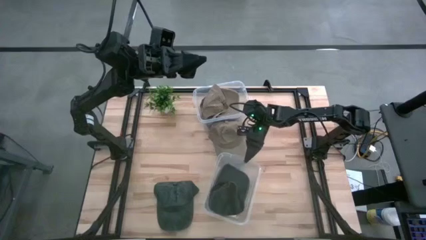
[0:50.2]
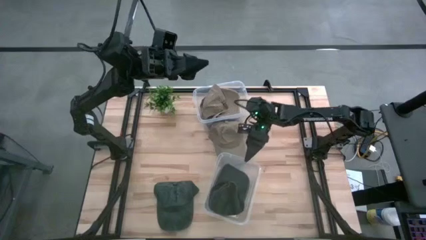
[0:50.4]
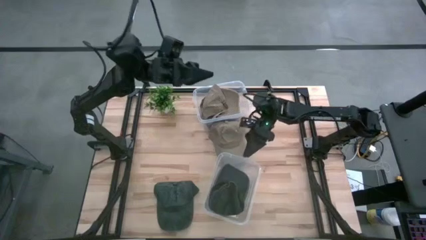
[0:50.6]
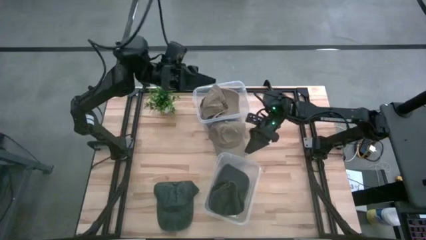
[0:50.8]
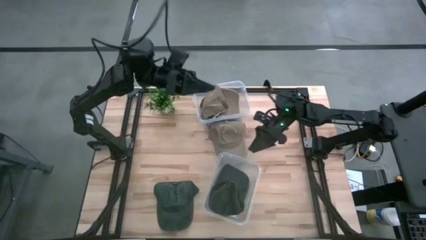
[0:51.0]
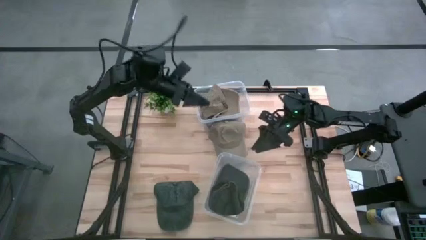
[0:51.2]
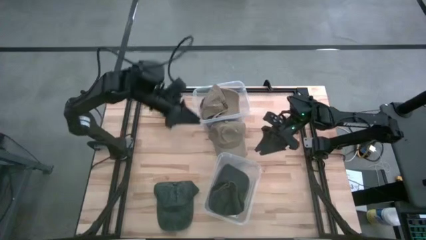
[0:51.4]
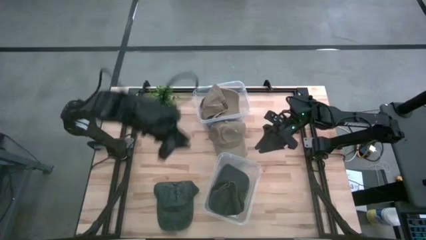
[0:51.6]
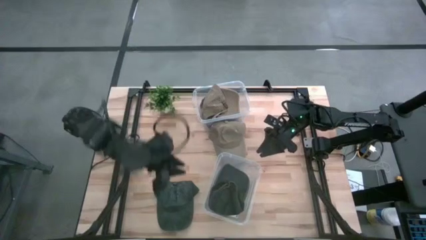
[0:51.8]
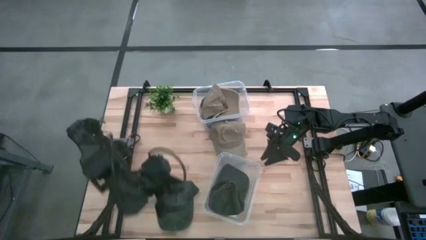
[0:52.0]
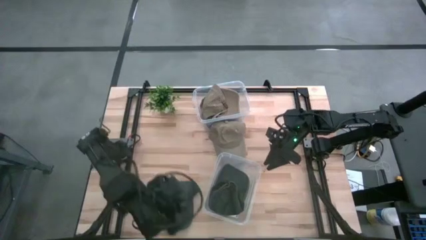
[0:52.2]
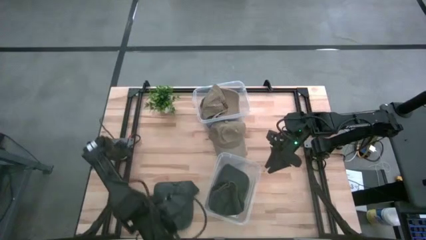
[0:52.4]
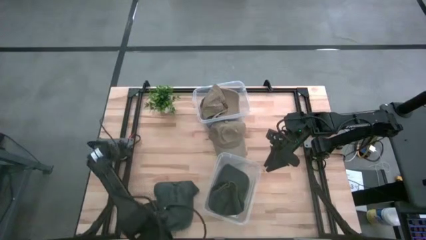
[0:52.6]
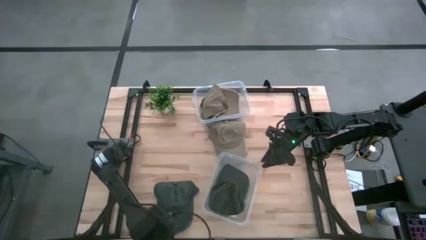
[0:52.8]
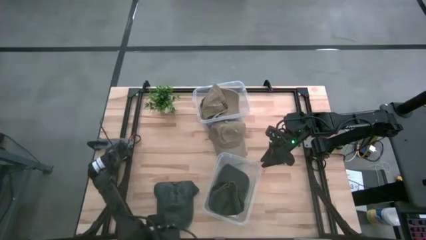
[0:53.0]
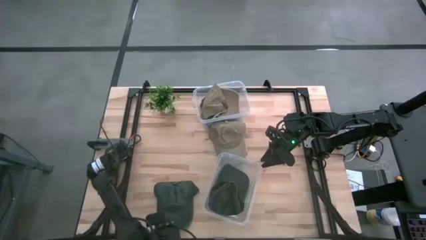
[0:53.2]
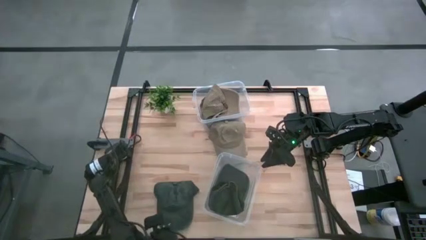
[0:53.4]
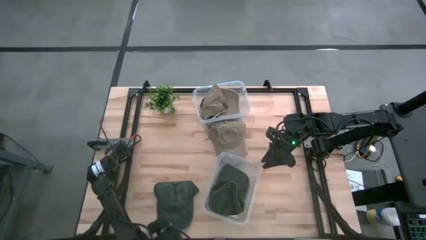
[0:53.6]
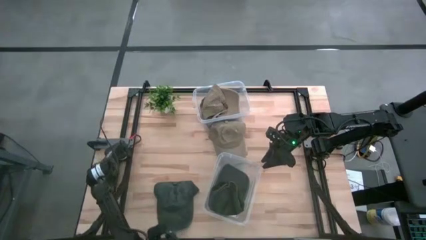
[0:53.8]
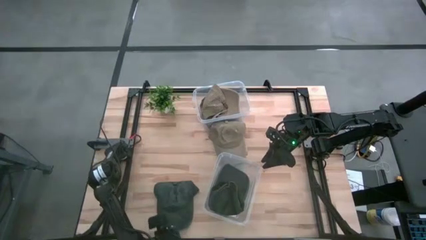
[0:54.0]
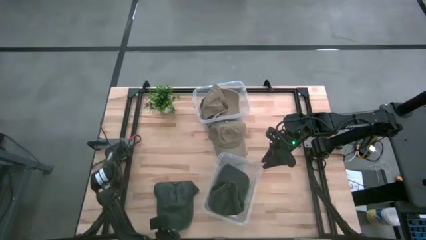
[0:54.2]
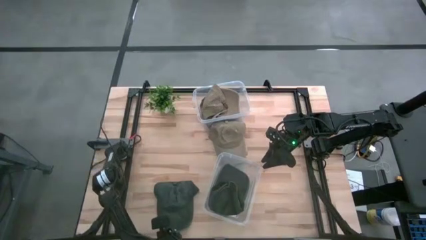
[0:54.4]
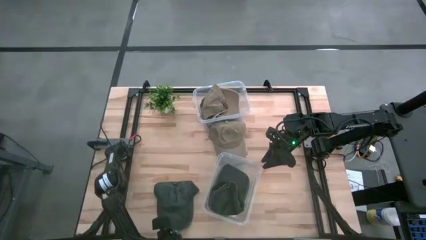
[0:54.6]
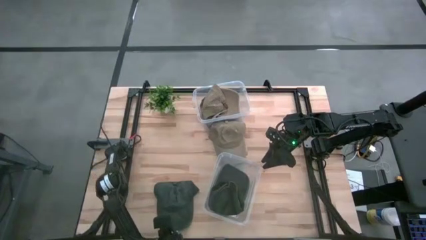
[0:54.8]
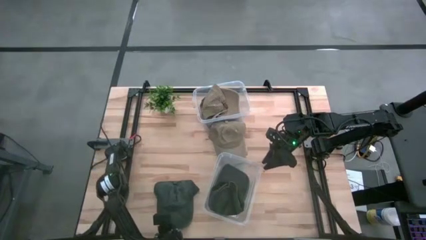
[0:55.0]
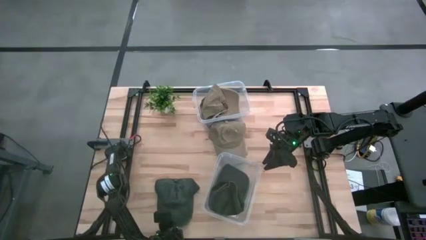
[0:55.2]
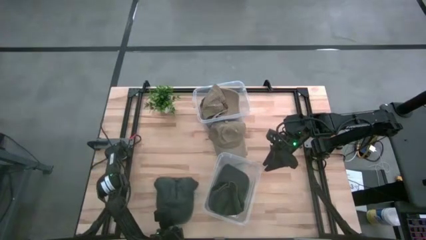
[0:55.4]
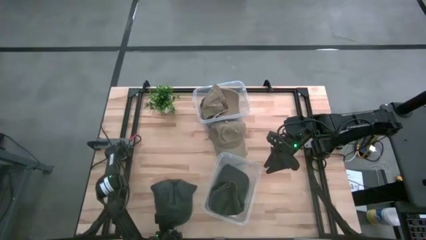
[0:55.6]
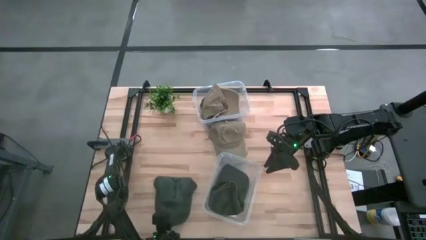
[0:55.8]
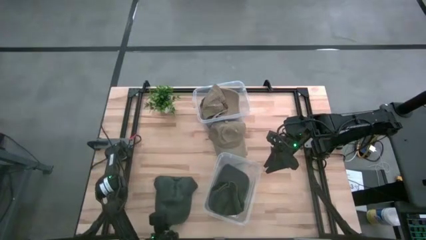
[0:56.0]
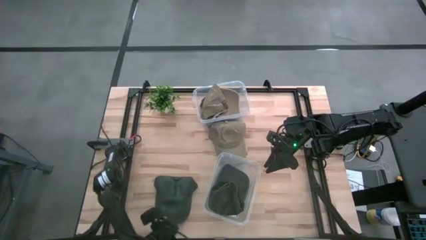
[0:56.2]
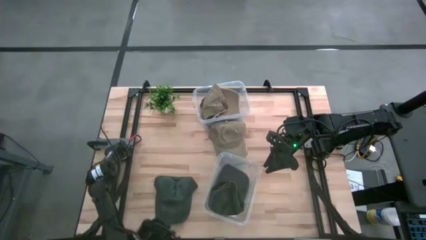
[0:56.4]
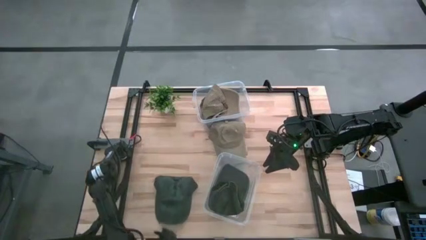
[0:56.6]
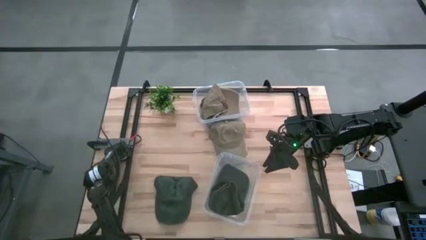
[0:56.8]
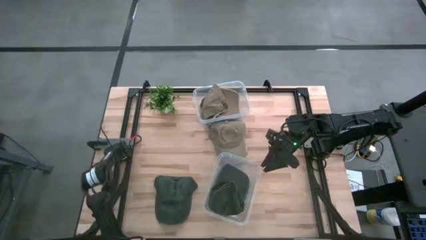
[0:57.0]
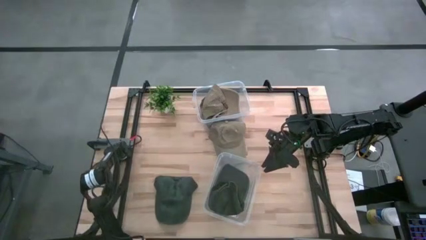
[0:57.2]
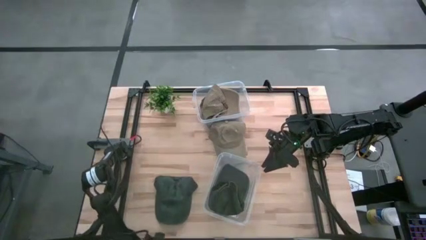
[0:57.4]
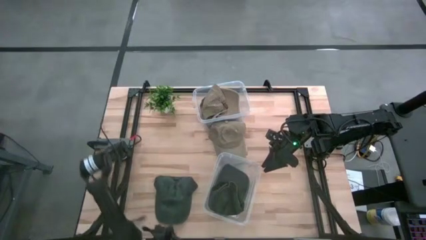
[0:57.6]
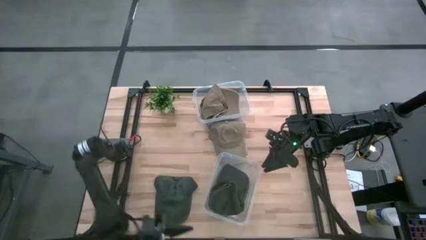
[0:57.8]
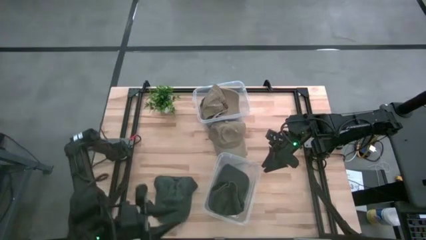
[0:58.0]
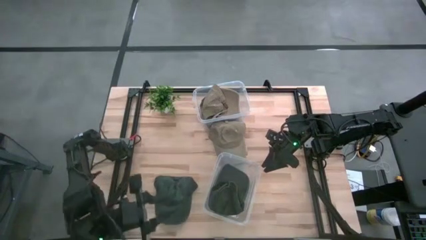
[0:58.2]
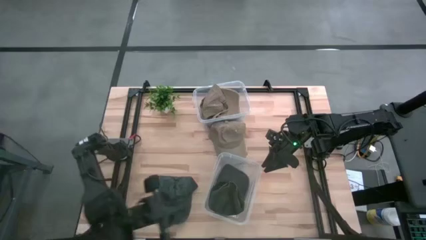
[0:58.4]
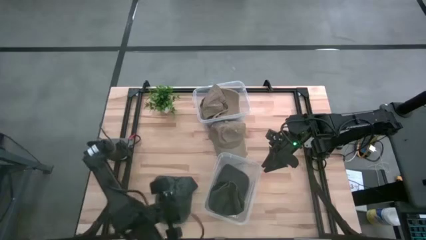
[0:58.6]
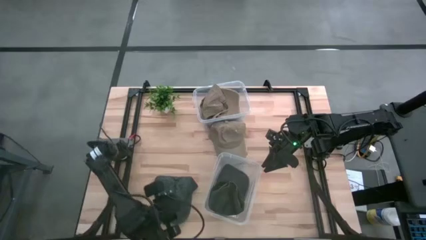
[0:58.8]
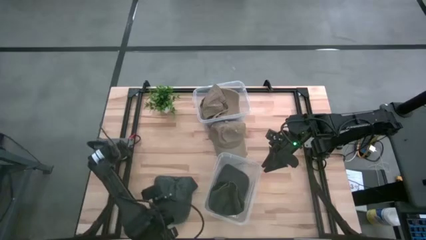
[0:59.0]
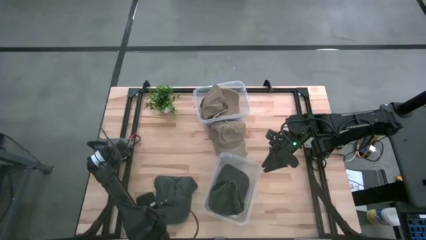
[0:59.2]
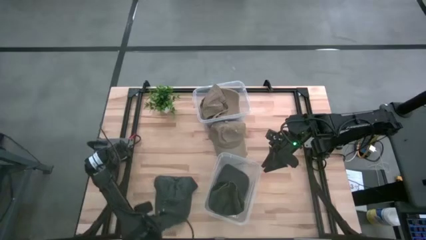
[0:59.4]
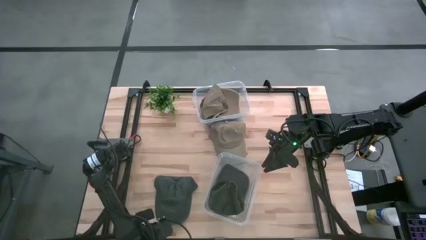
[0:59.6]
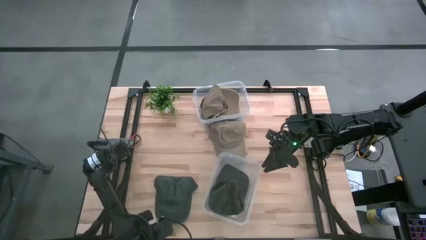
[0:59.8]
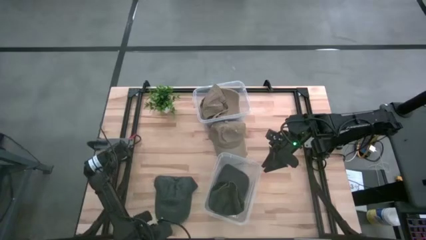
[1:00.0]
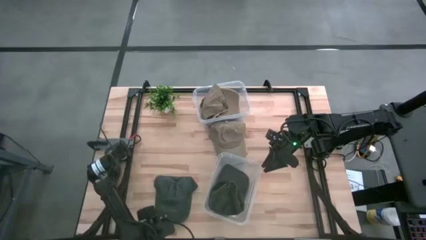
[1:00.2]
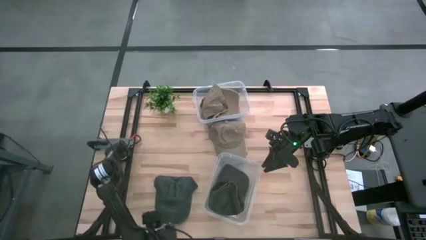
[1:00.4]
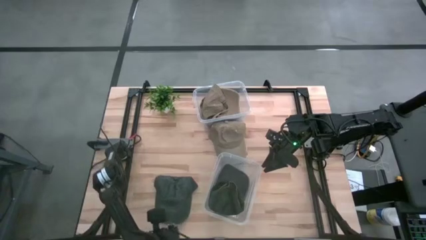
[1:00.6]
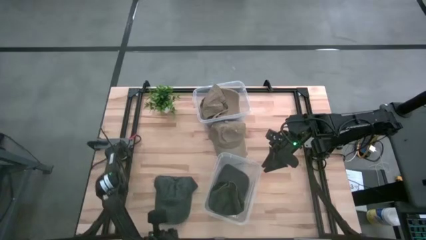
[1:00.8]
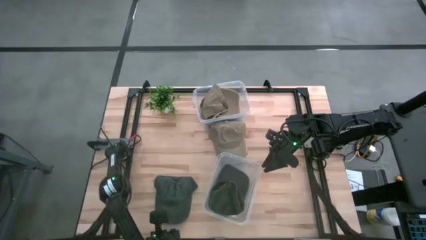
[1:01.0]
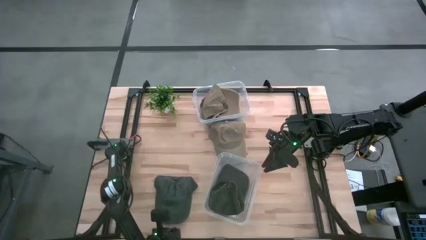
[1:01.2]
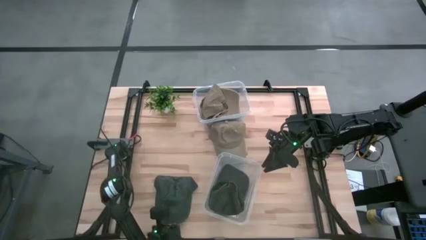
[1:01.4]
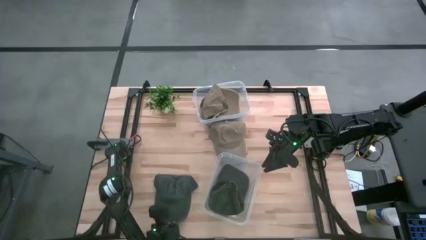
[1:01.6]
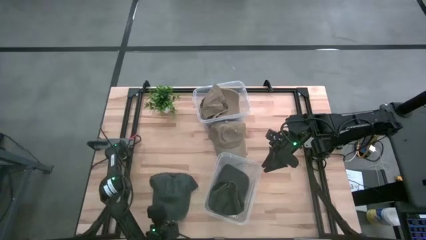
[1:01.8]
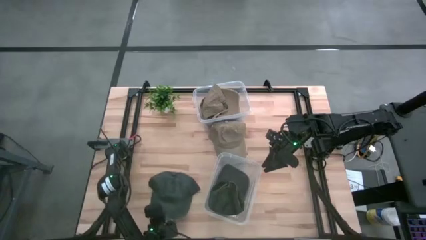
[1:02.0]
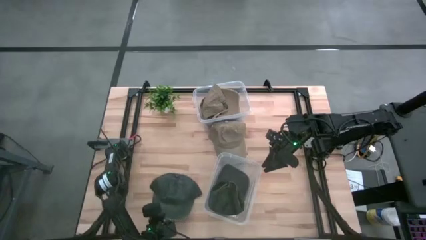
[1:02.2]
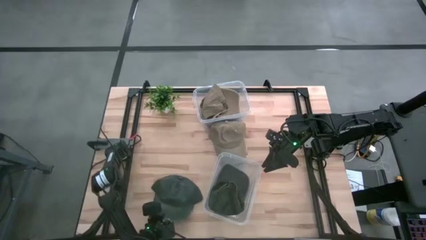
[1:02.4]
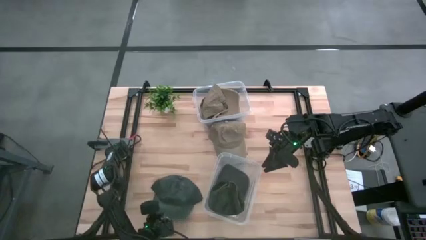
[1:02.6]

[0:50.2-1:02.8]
Task: Pick & Place hat
Put the gray cap into the bottom transparent container

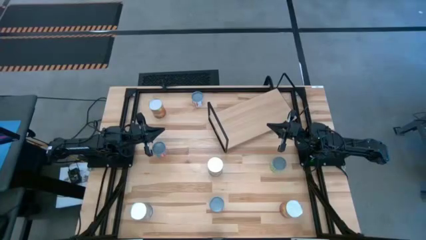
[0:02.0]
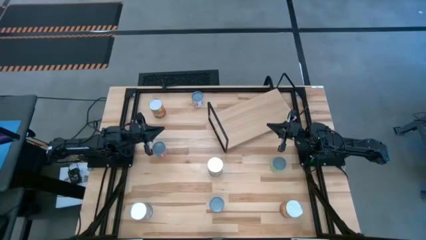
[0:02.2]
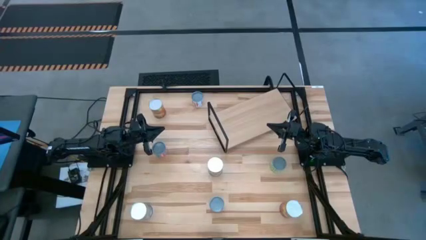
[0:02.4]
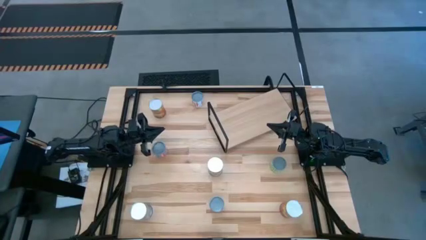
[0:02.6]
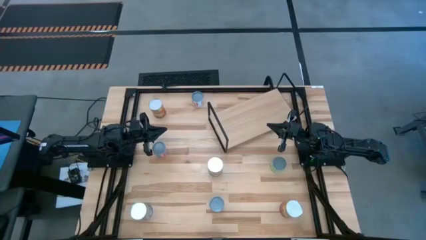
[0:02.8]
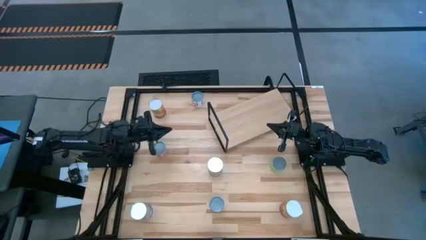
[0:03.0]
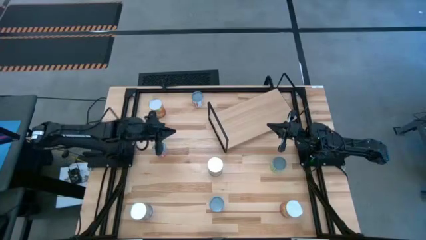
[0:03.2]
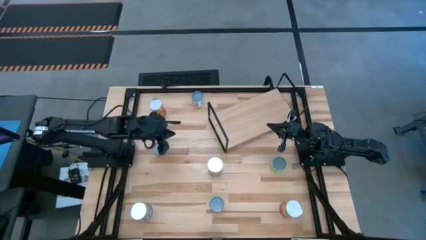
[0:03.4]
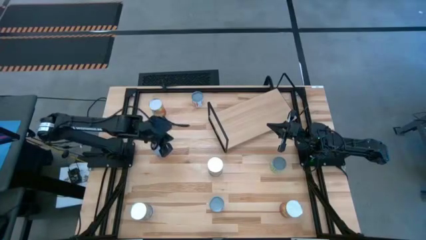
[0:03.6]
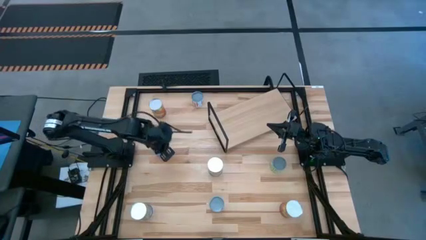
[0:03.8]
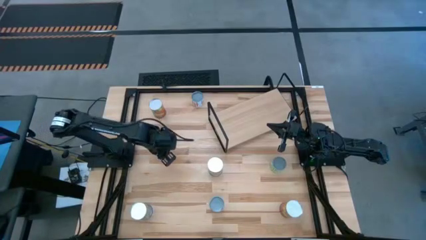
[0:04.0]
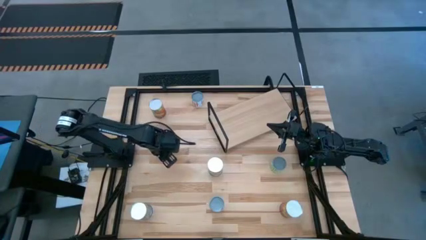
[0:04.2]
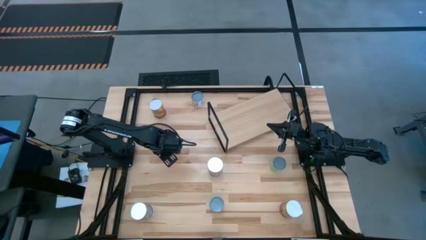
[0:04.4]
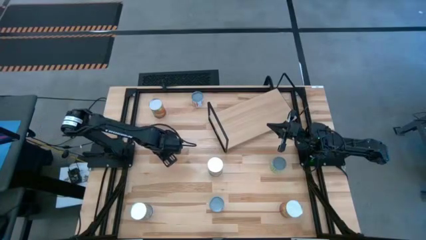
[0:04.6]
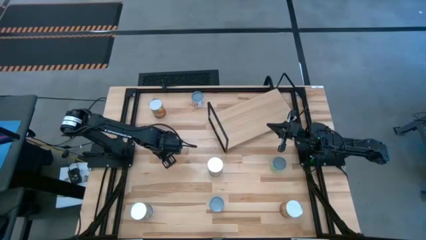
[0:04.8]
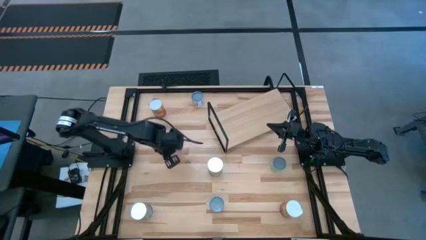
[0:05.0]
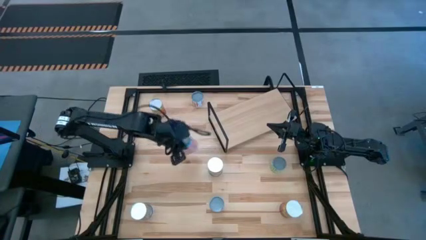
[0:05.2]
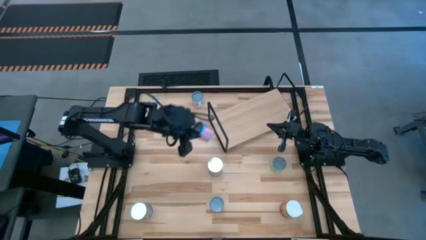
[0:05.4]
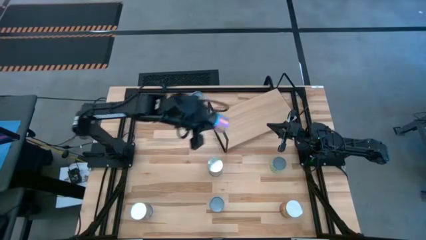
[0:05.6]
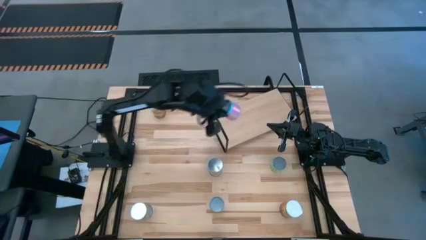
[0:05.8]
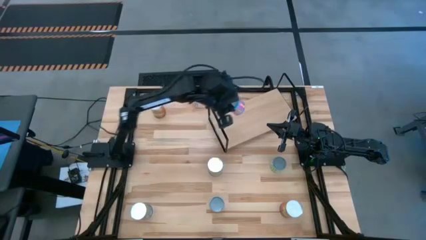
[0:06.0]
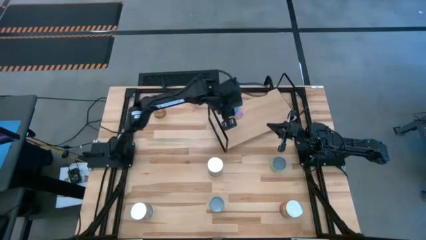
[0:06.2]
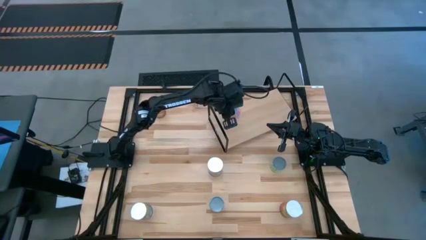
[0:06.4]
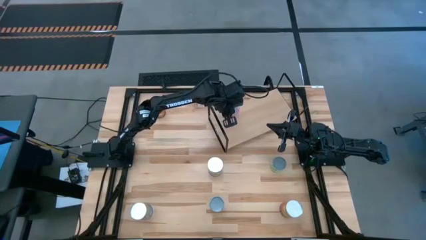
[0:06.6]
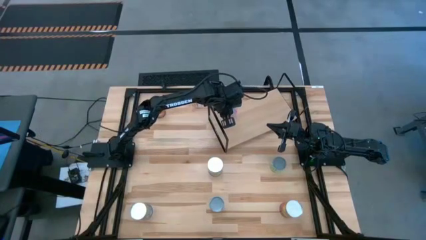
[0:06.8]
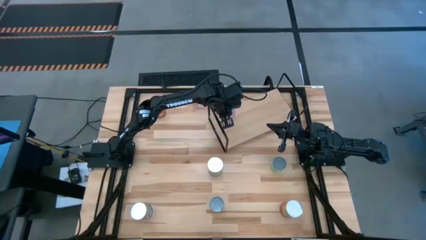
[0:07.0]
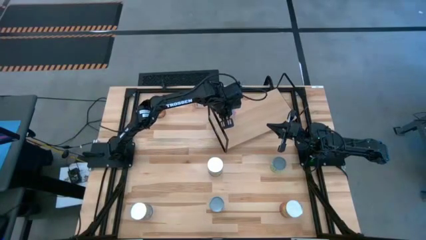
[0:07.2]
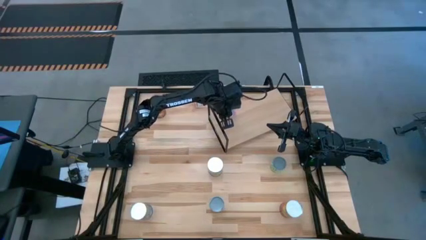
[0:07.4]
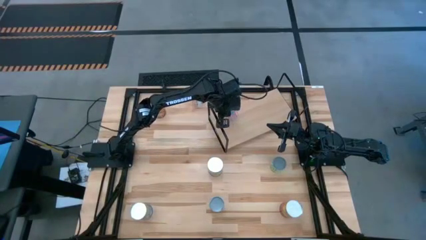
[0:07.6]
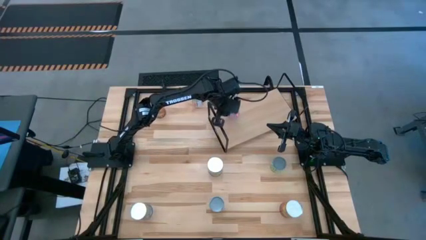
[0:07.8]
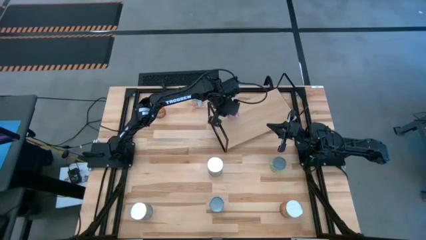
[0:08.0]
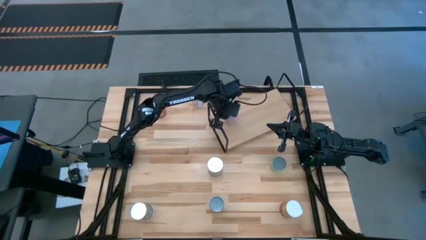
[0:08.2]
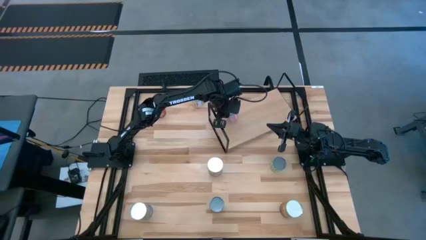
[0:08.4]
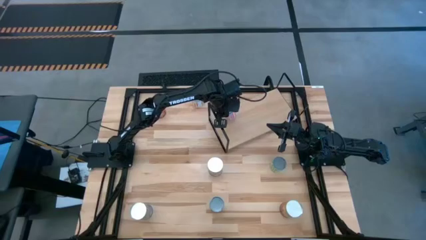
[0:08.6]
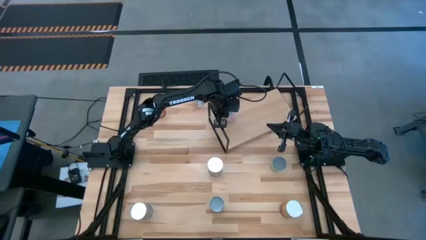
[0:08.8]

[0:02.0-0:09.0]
Task: Pick and place cans onto a shelf
Put the canned mixed corn on the shelf
